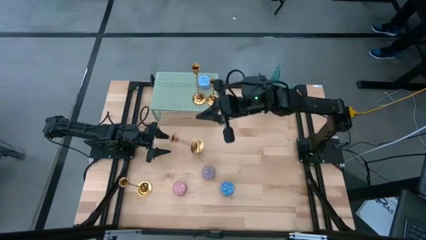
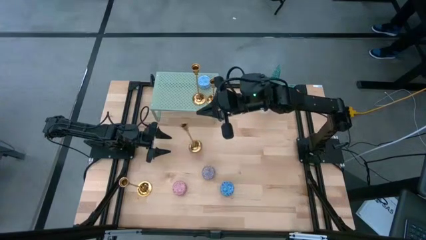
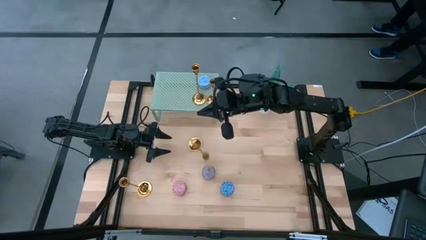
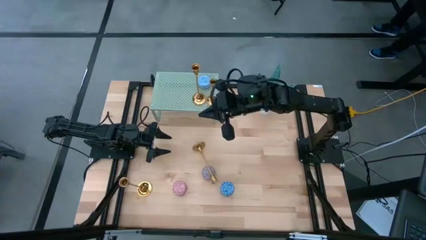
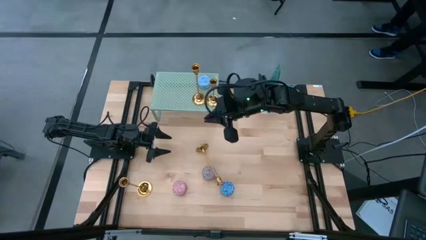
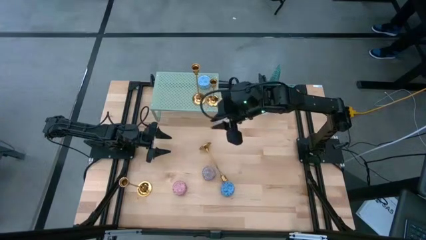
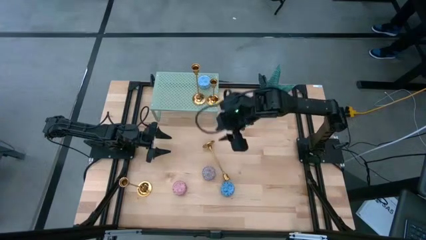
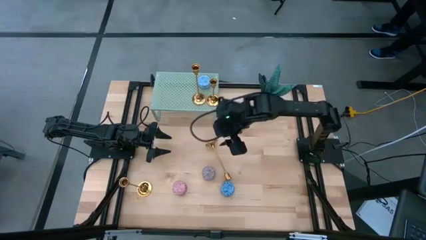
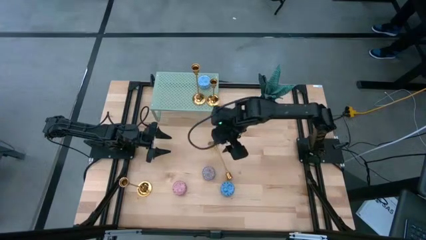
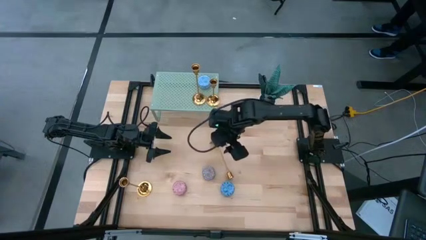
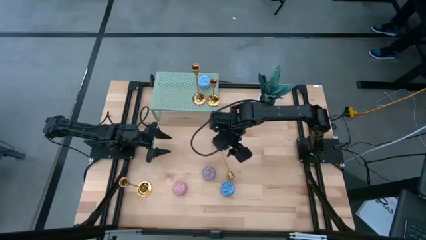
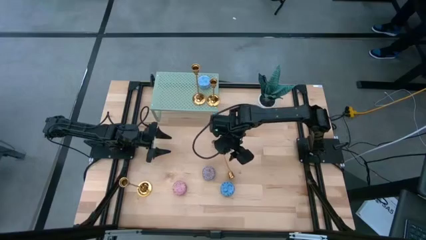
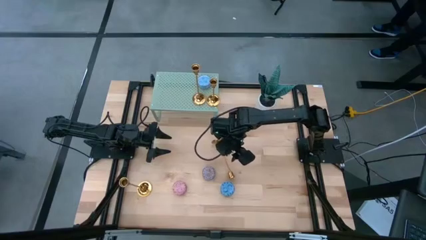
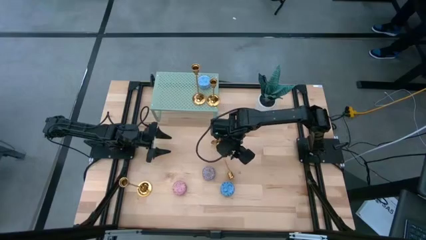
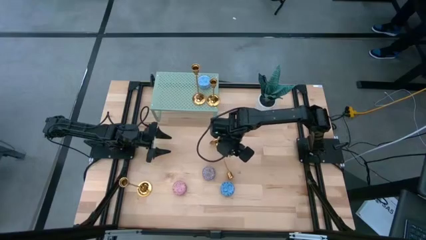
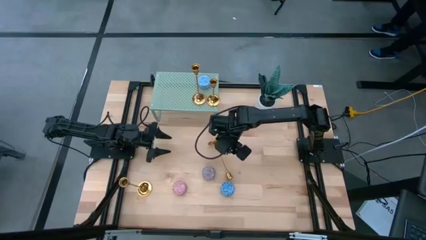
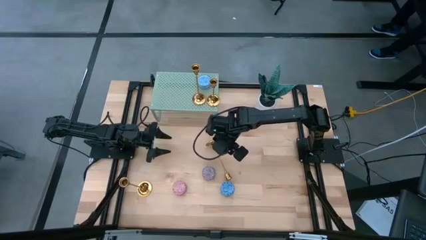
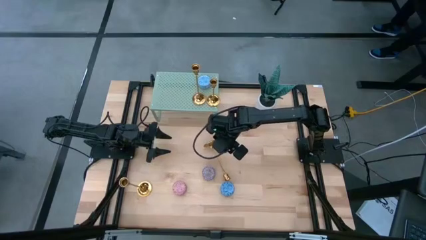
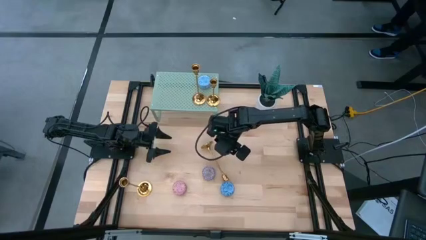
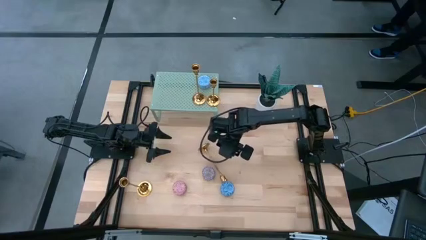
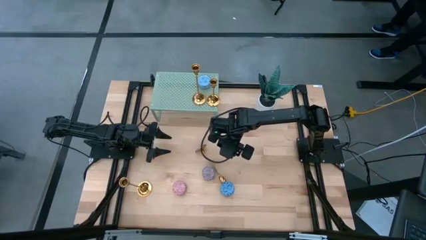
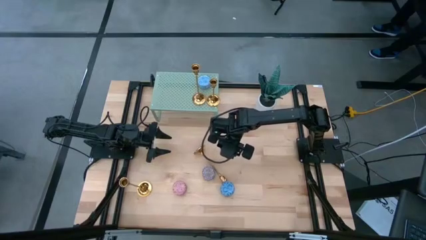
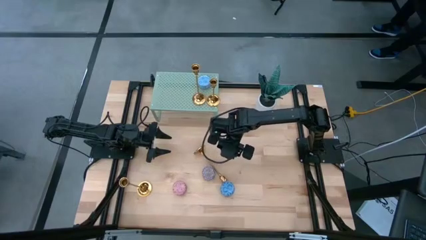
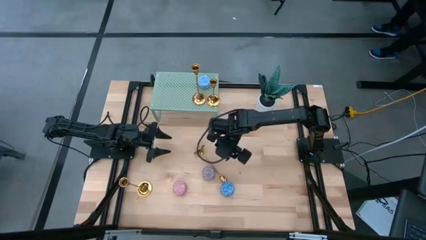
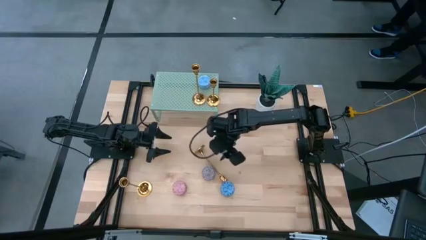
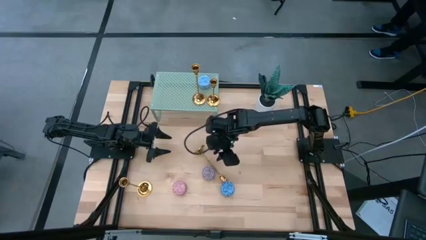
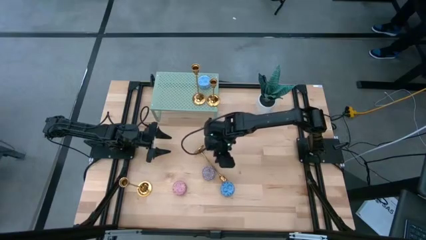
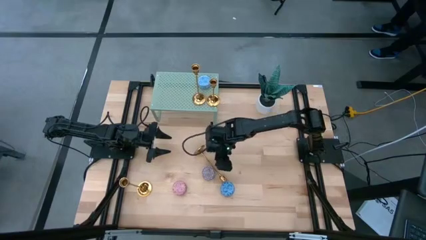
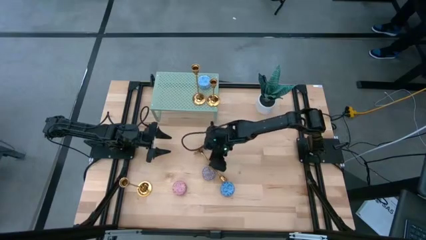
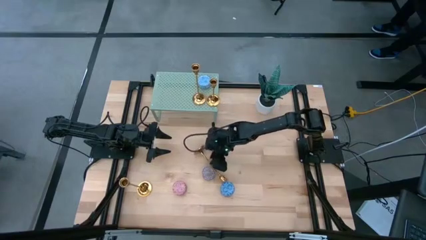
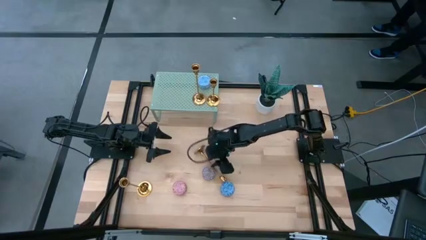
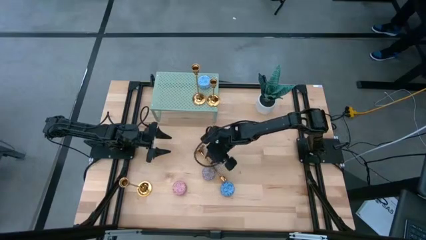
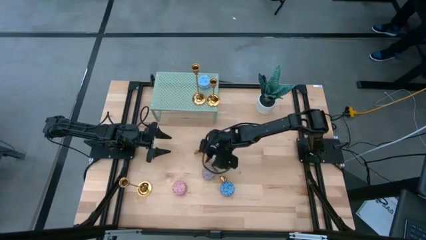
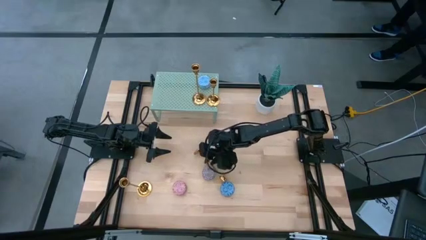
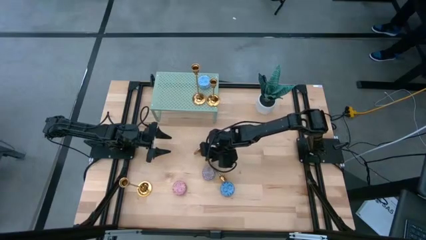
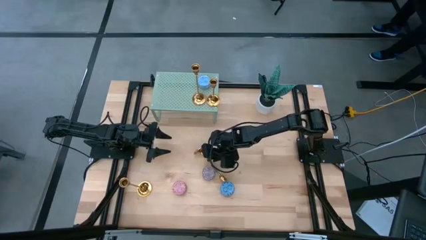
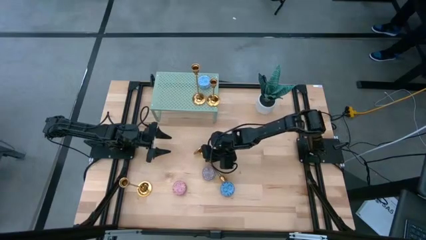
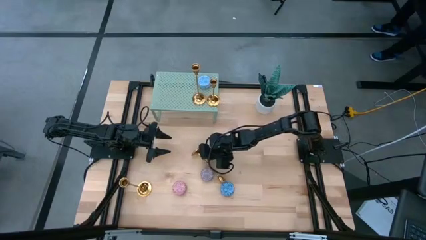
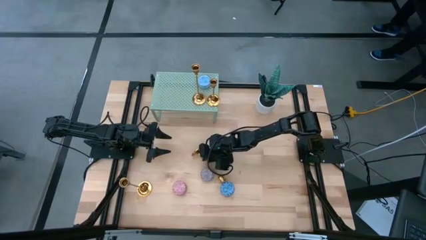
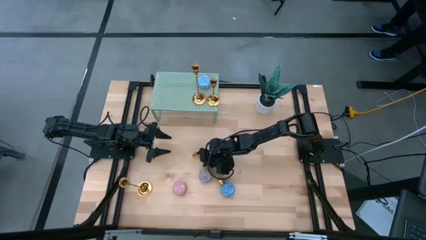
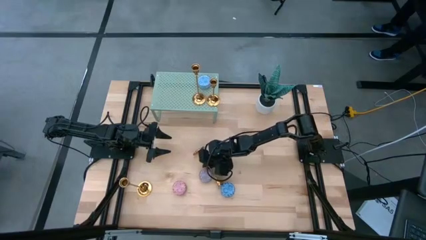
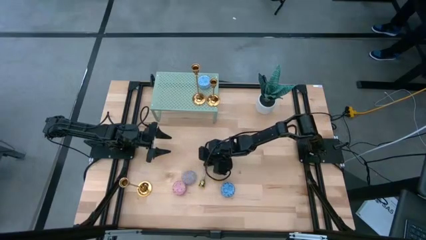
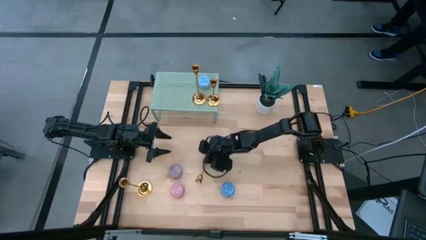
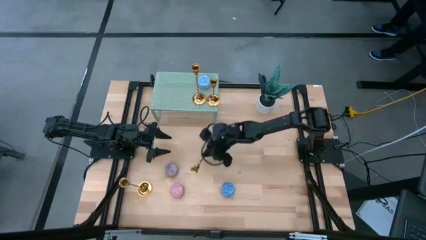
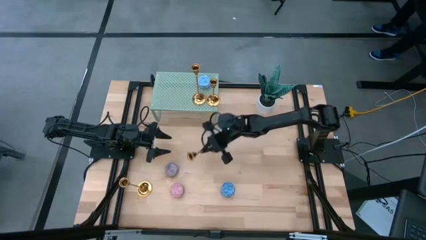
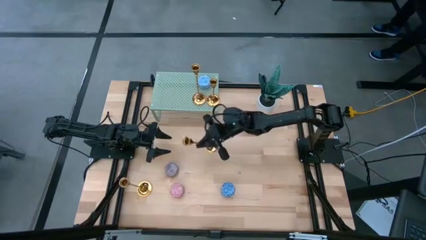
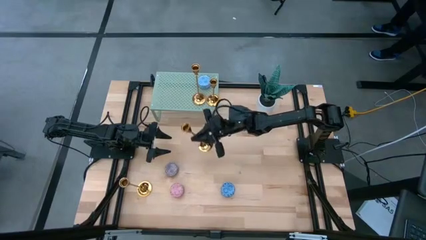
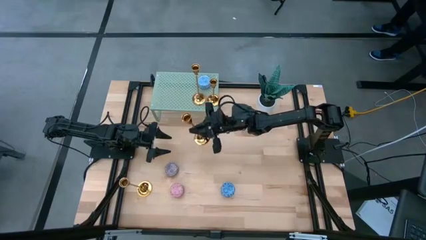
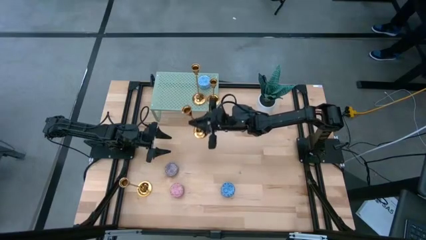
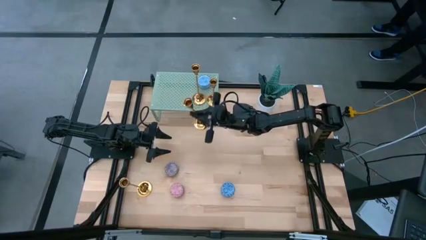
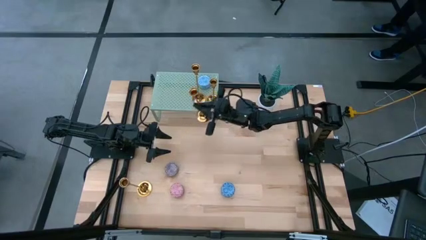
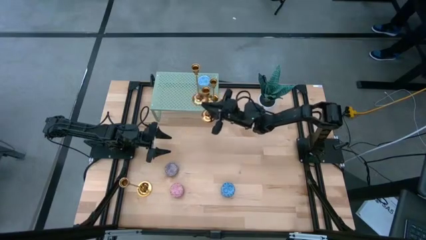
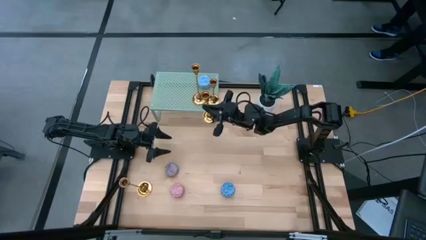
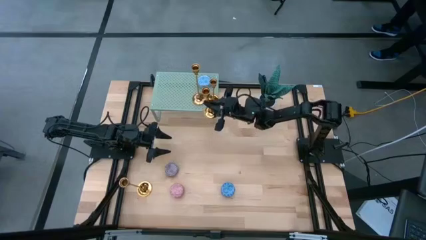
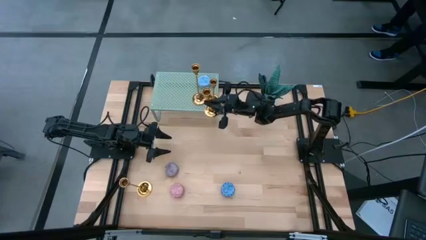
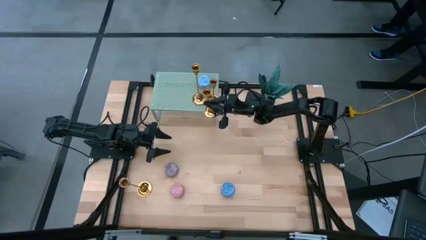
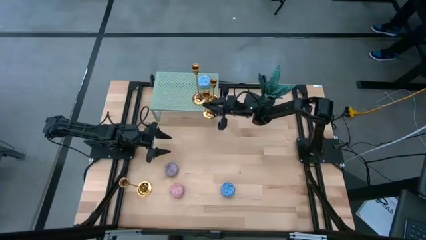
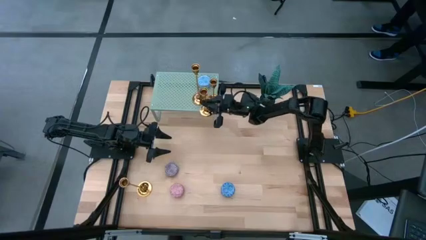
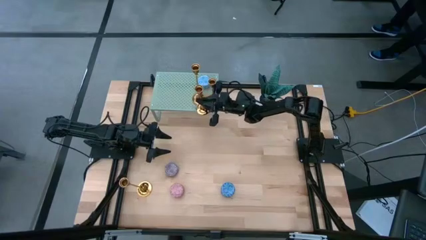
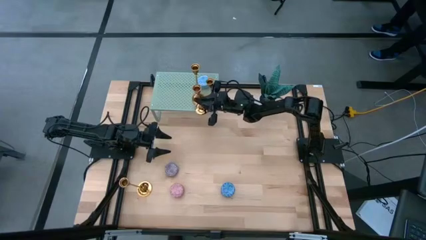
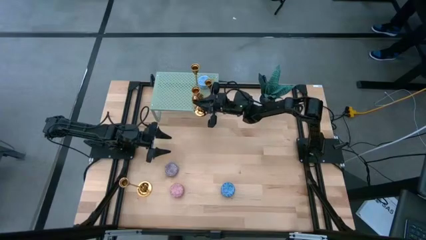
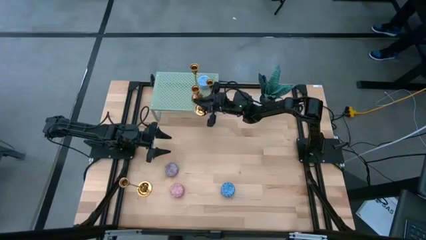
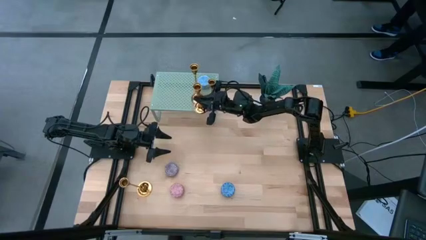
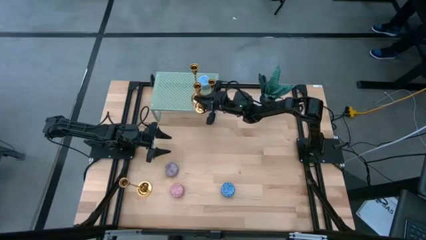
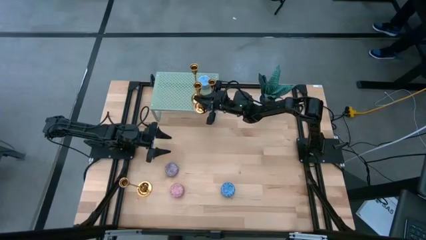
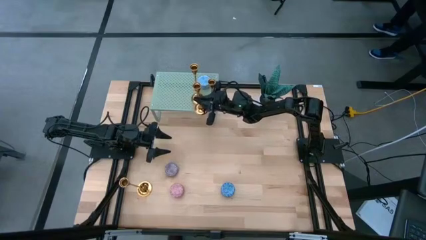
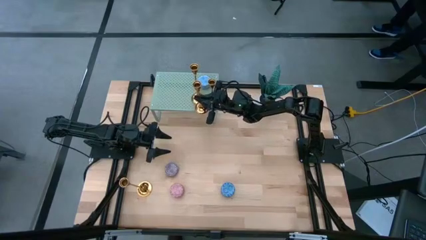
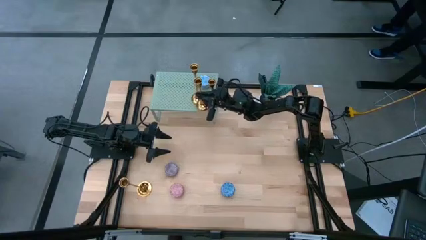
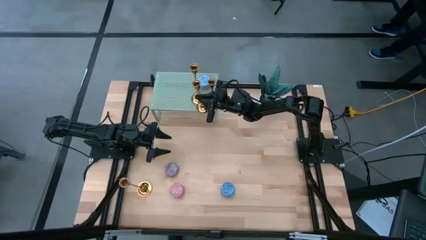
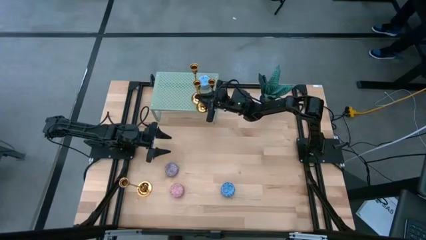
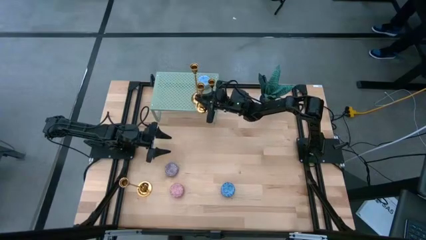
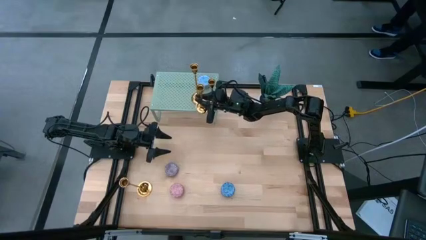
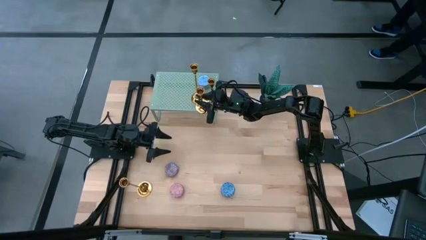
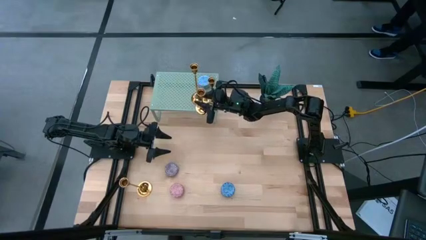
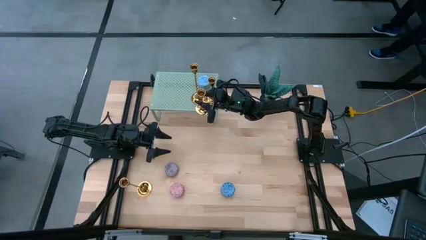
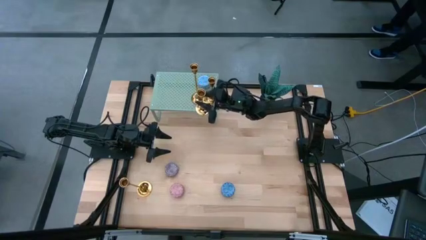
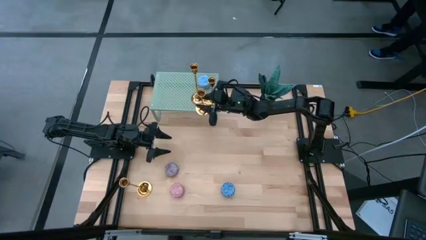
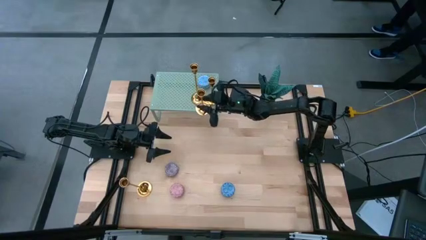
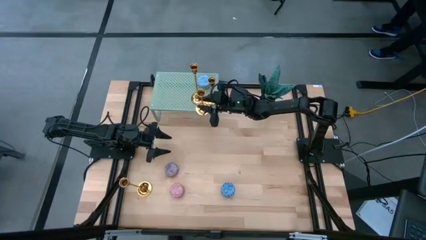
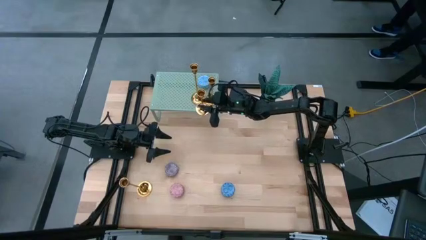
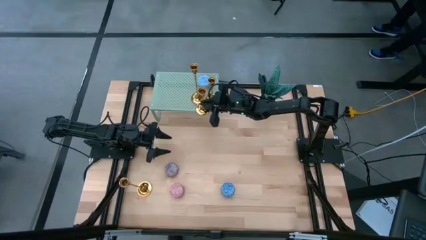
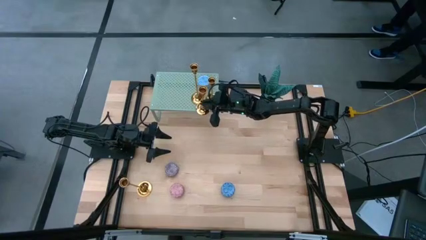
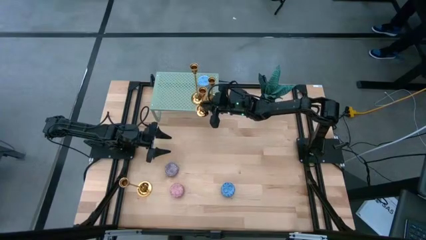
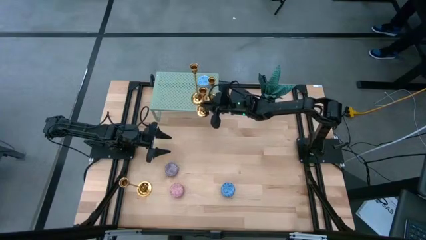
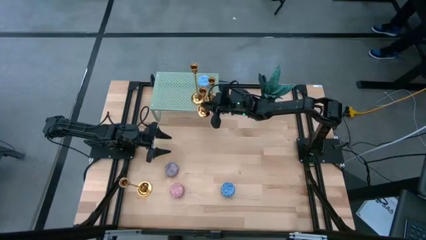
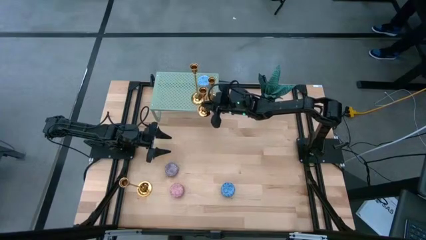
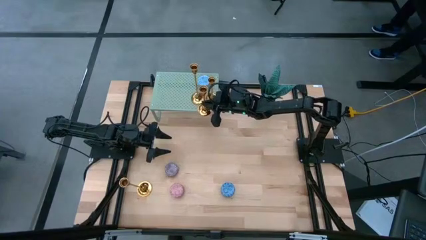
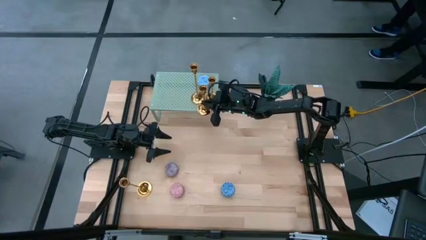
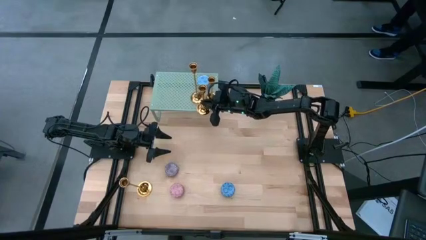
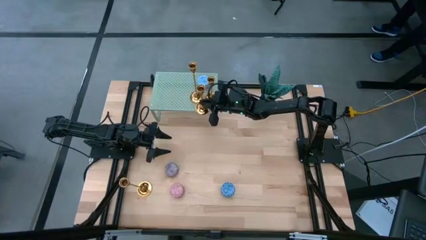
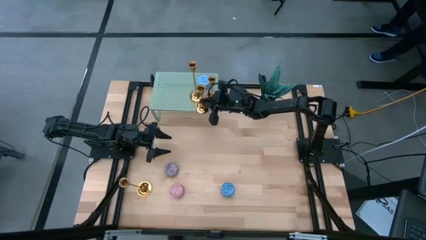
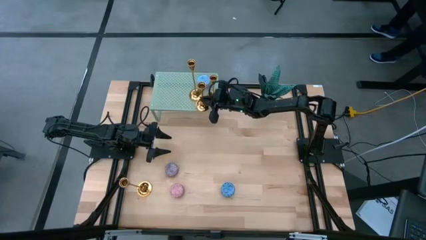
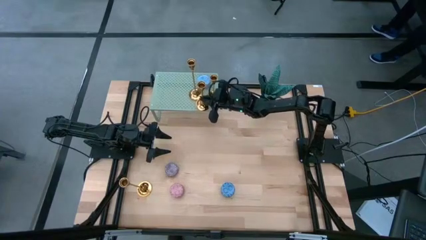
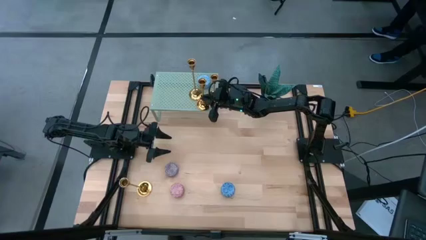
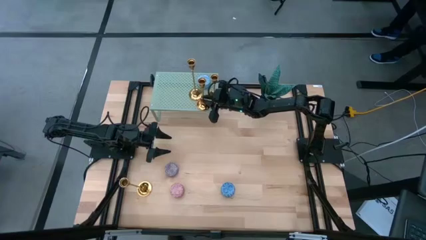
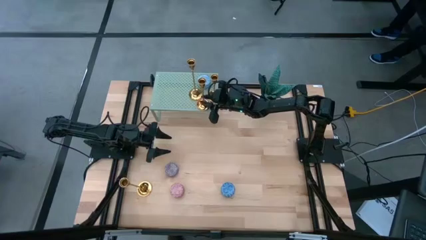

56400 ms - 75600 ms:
Task: Pick & Place candle stick holders
Put the gold candle holder on the shelf
